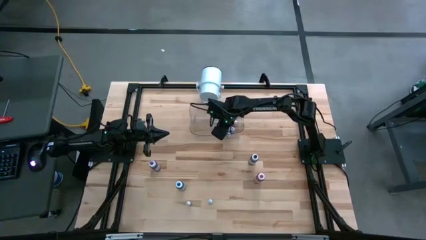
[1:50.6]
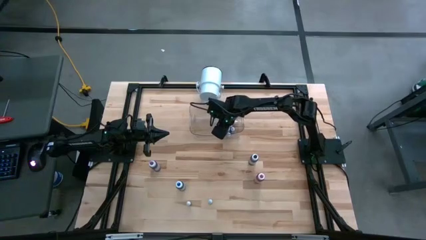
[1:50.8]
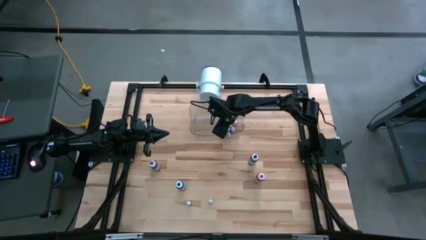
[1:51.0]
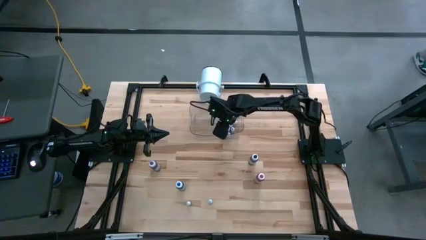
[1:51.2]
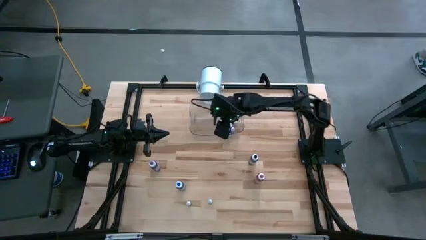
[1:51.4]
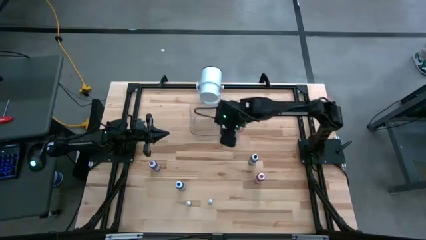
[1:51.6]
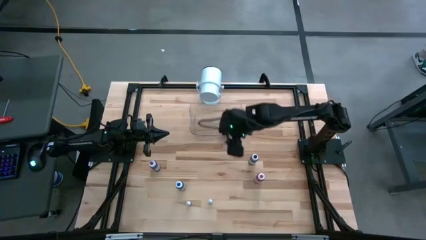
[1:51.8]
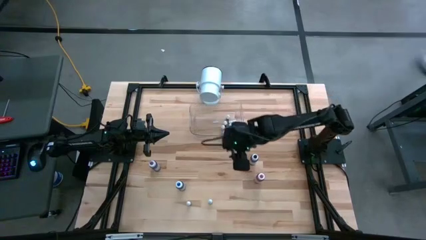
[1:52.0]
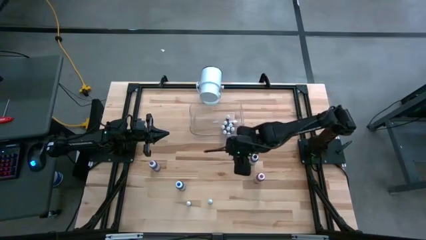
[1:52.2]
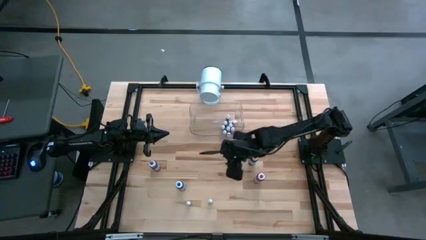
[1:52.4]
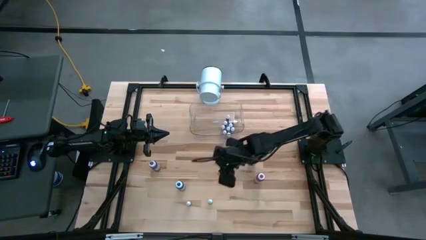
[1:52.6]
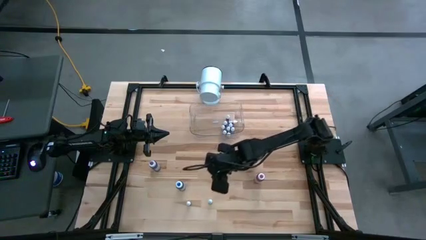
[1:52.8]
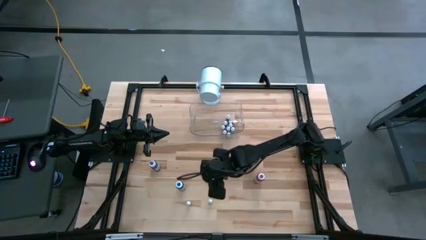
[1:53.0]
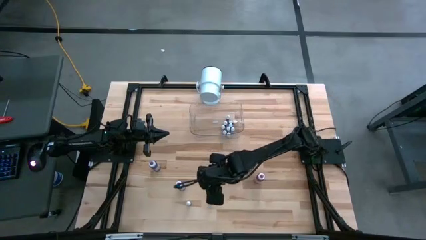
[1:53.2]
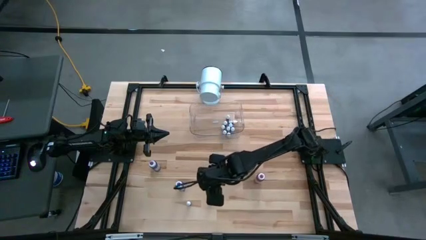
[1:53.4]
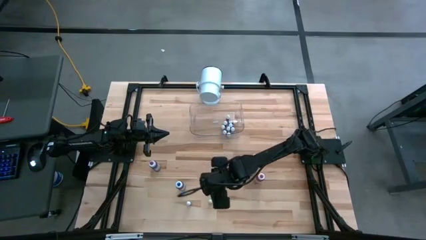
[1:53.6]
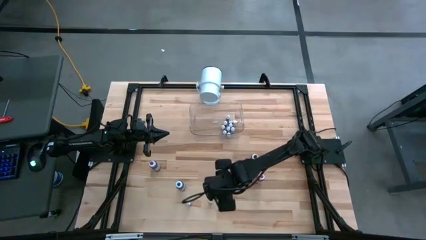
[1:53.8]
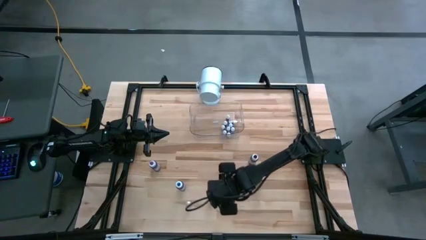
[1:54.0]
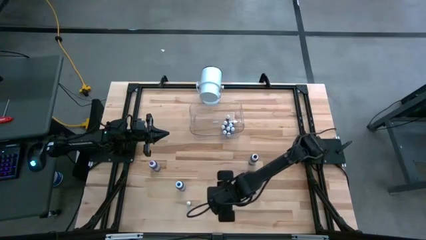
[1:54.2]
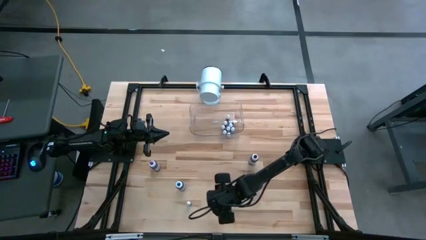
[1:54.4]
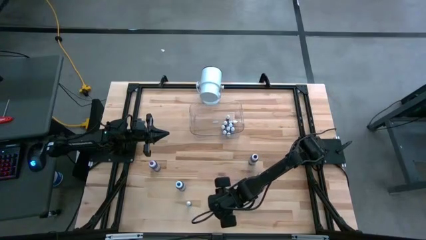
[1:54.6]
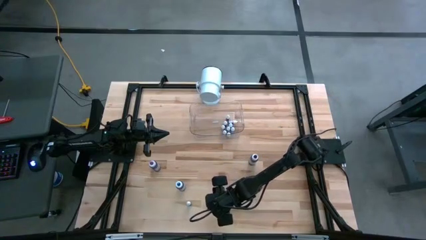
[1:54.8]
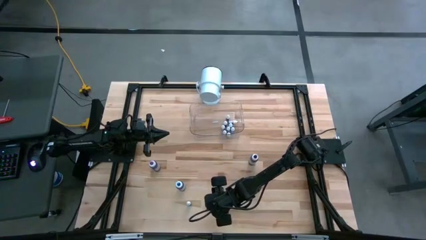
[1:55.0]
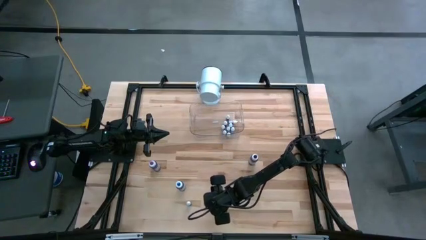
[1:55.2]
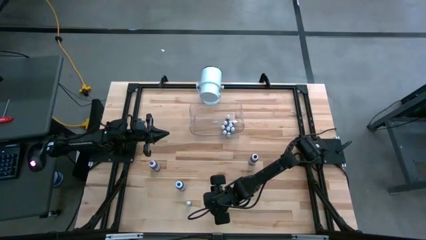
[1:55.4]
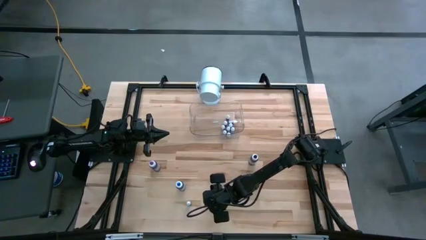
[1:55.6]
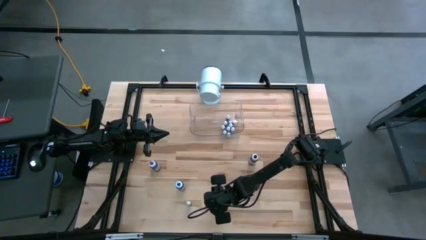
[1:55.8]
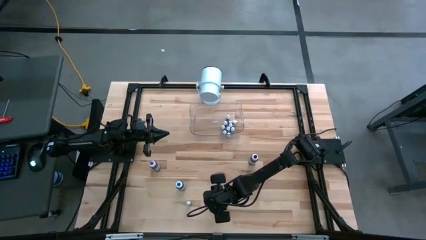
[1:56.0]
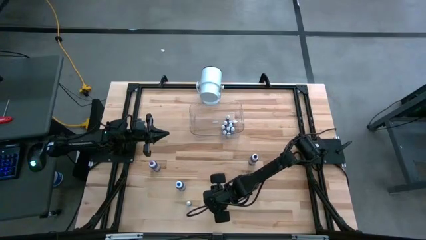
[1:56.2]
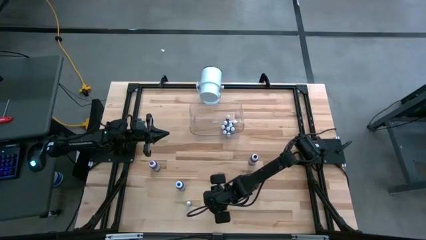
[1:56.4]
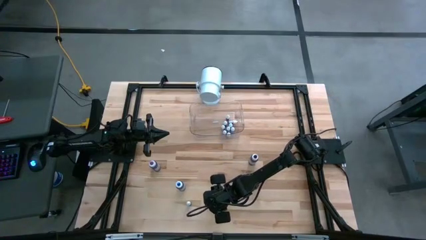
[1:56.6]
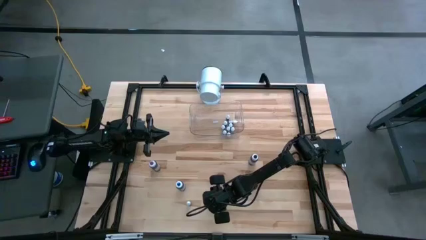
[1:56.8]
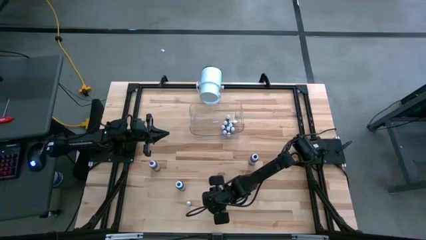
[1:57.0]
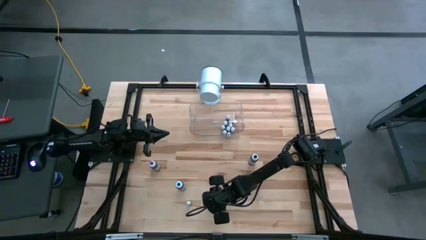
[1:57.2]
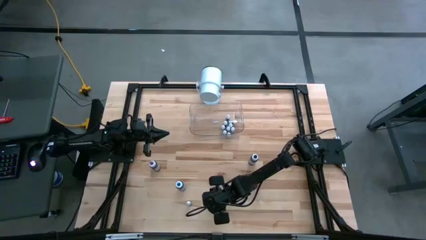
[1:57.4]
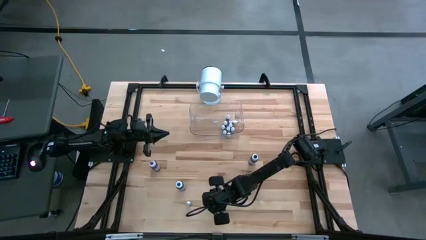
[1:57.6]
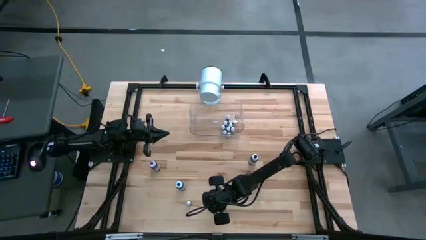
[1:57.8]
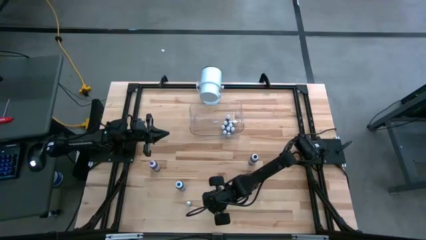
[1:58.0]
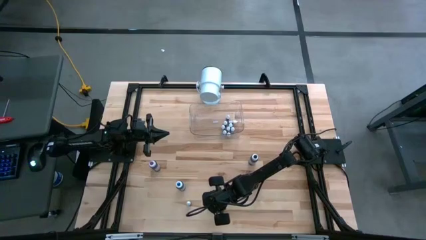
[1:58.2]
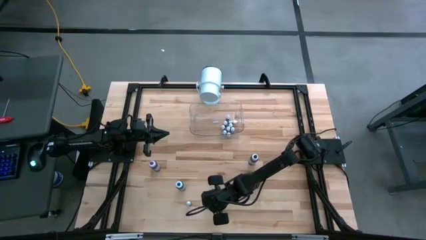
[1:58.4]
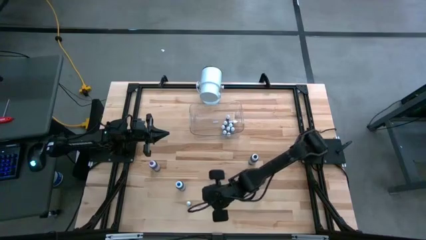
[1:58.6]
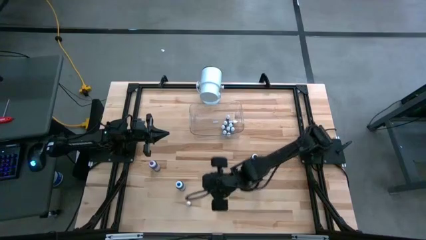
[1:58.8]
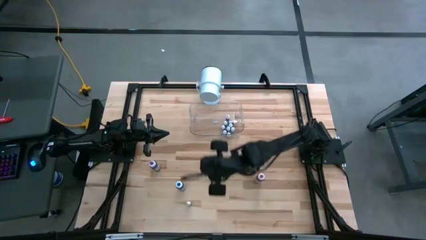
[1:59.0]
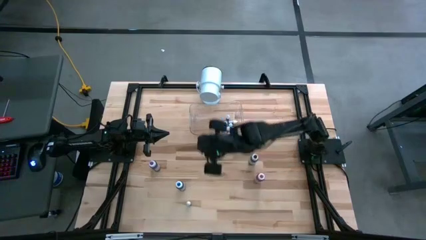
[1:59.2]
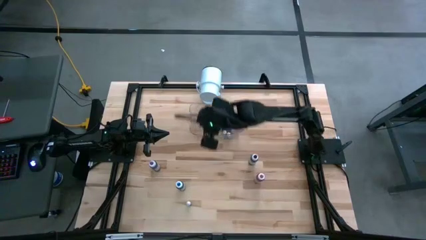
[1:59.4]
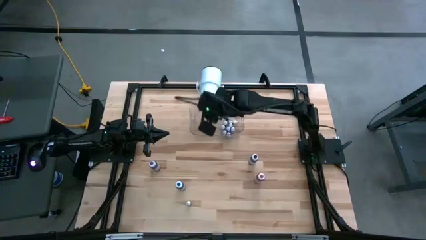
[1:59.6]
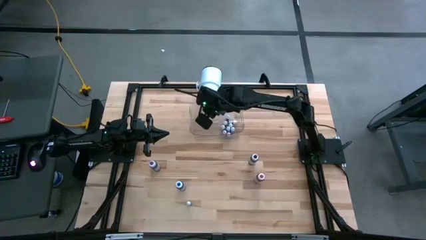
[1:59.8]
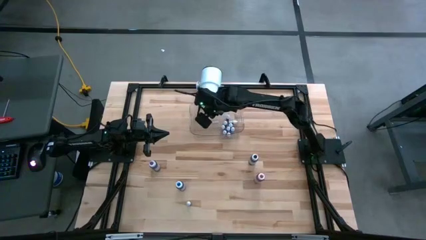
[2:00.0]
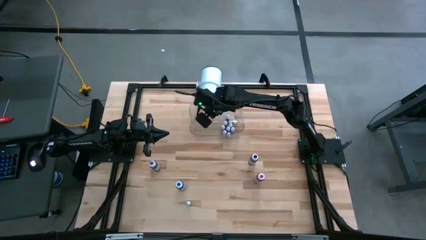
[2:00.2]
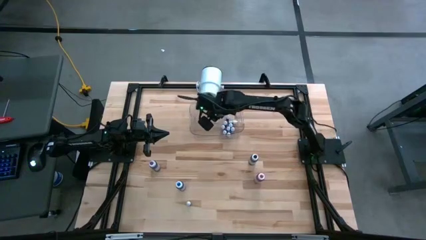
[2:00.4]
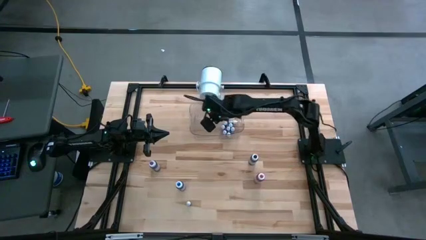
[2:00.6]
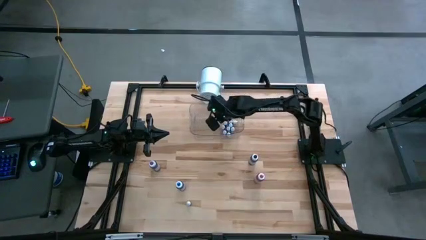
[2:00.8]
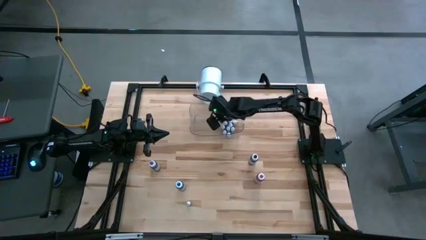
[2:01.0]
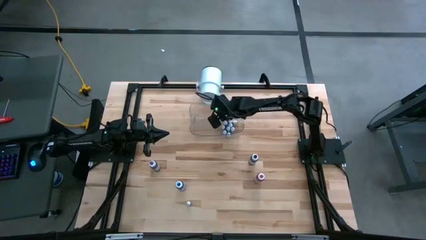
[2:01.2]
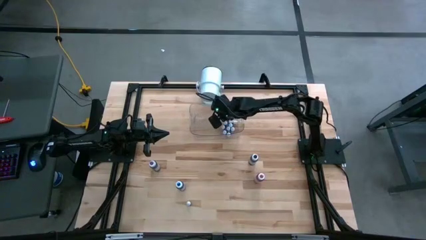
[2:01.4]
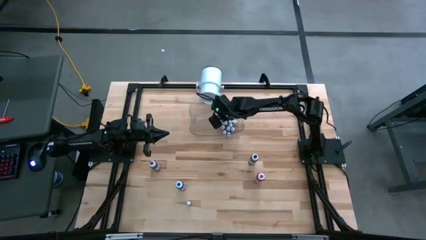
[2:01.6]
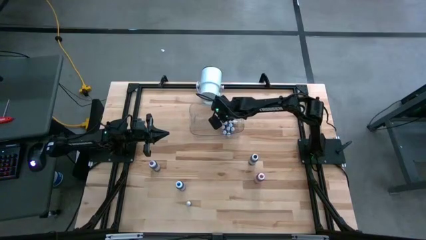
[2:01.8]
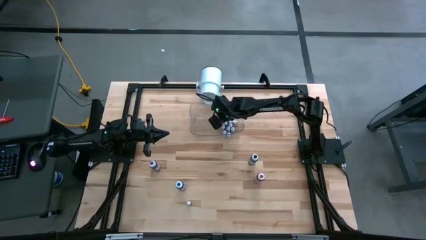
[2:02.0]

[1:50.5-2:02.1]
Task: Pick & Place food coloring
Put the small light blue food coloring bottle into the transparent bin

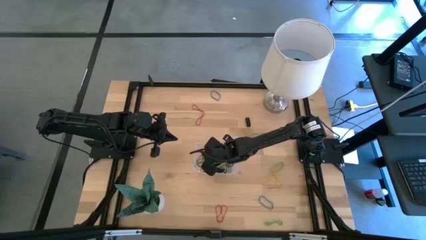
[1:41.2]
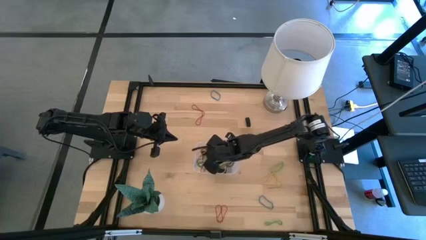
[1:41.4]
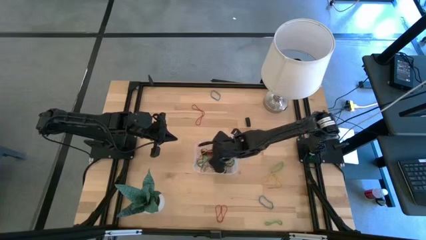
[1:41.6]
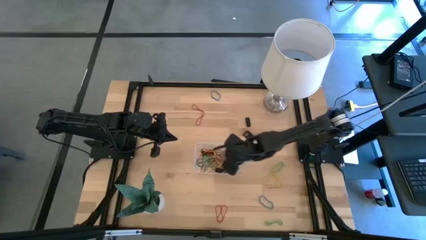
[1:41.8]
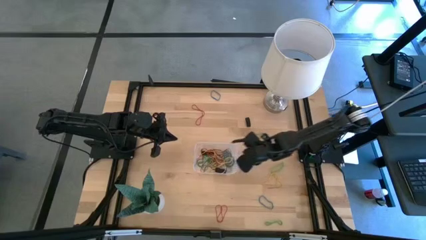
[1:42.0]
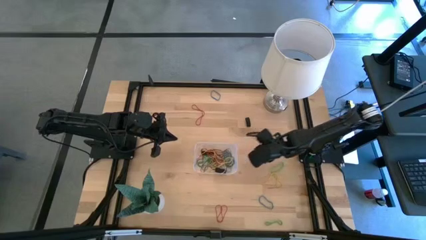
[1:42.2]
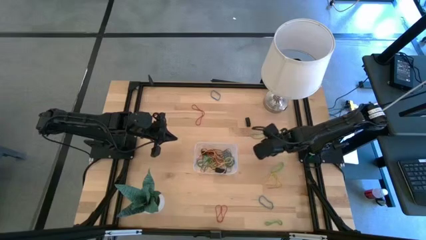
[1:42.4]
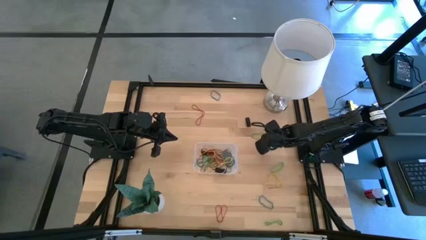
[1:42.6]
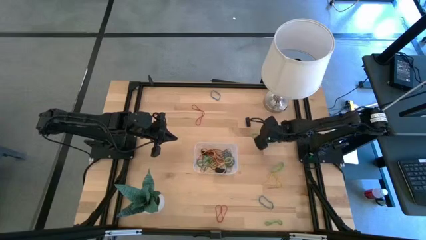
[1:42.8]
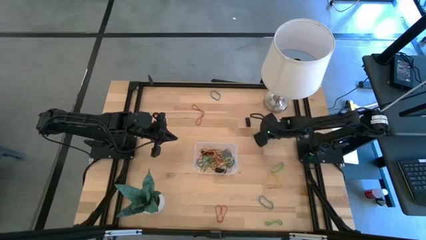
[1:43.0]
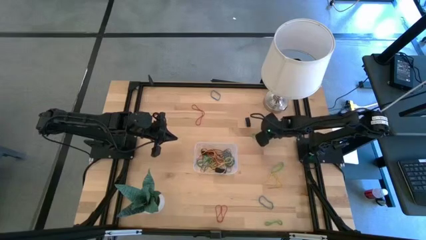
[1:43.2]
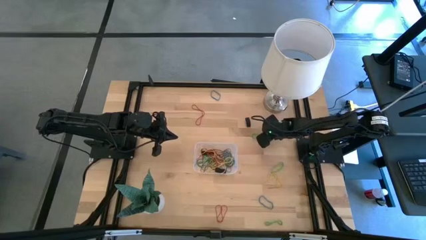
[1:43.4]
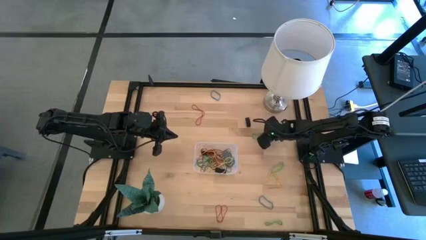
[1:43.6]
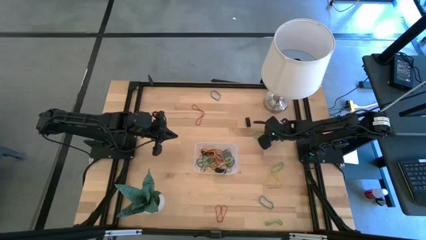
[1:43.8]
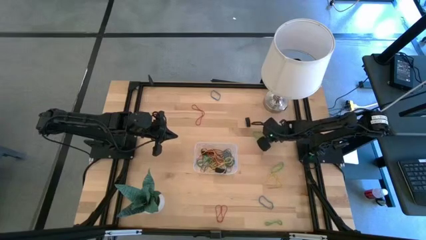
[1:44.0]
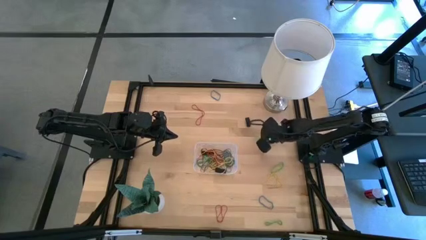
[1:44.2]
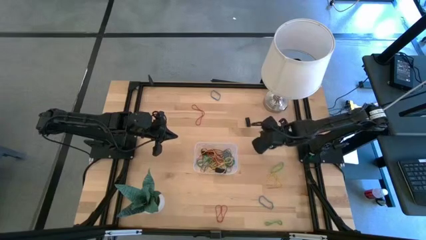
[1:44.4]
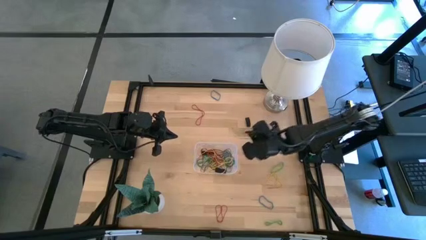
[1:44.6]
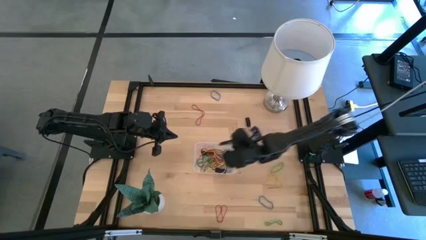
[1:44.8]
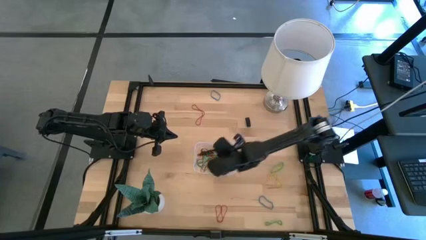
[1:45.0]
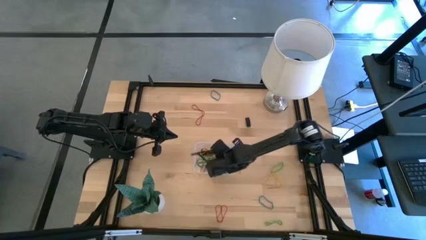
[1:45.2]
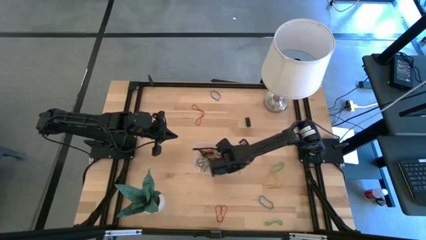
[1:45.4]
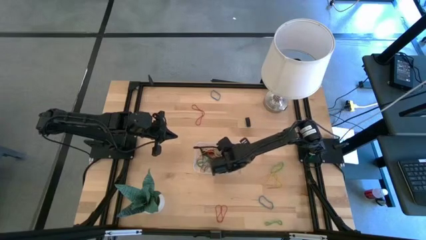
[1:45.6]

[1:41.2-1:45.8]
Task: Pick and place rubber bands into bin
Put the green rubber band into the transparent bin
